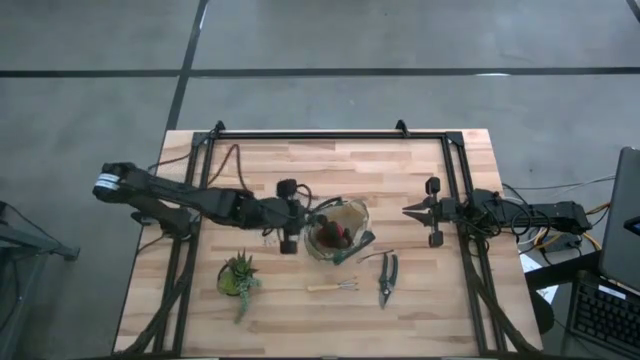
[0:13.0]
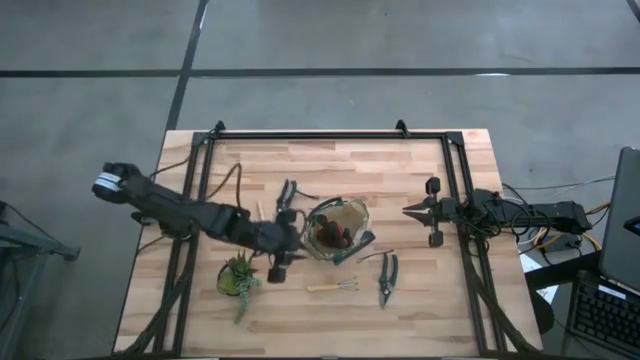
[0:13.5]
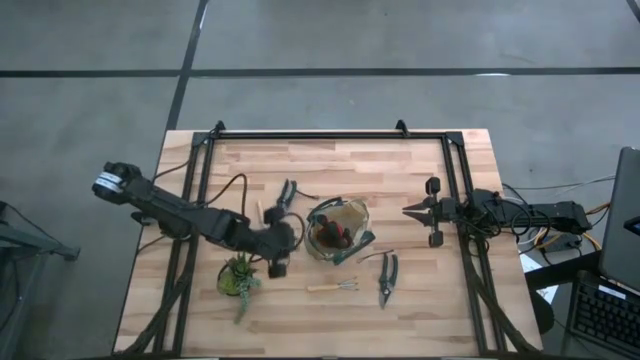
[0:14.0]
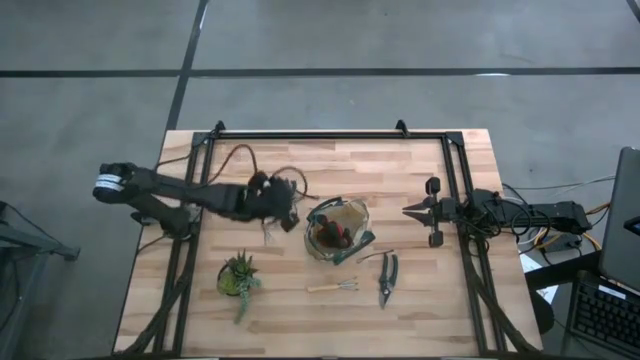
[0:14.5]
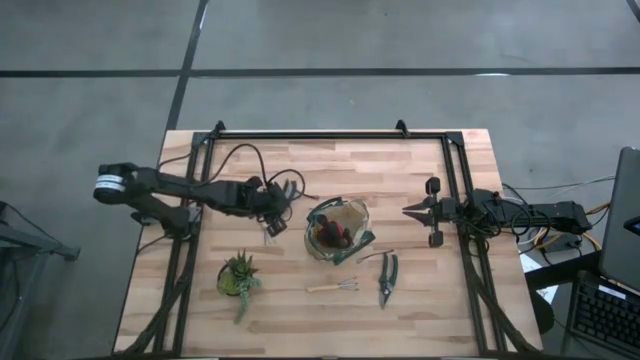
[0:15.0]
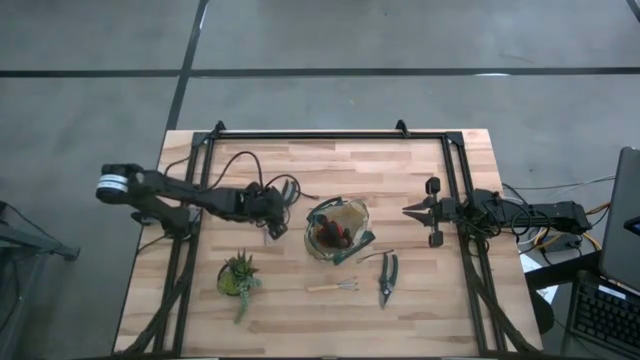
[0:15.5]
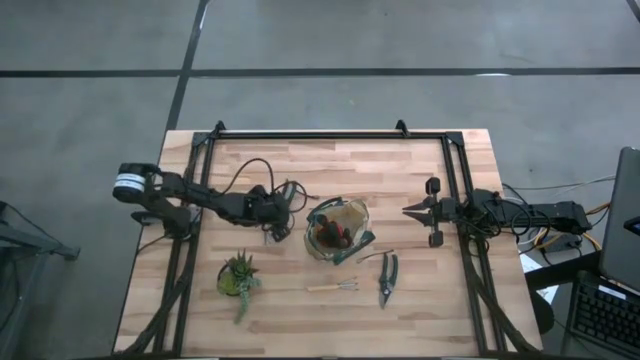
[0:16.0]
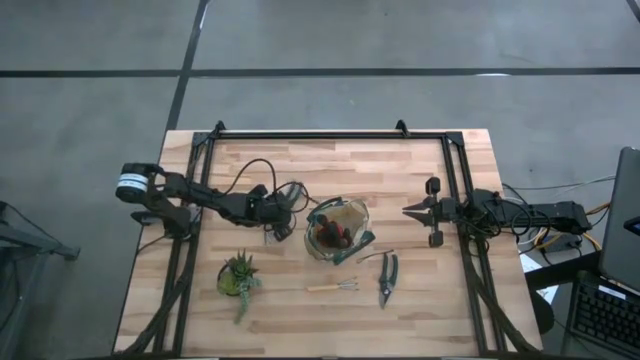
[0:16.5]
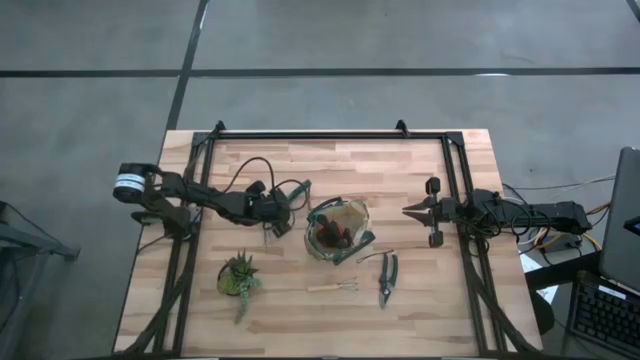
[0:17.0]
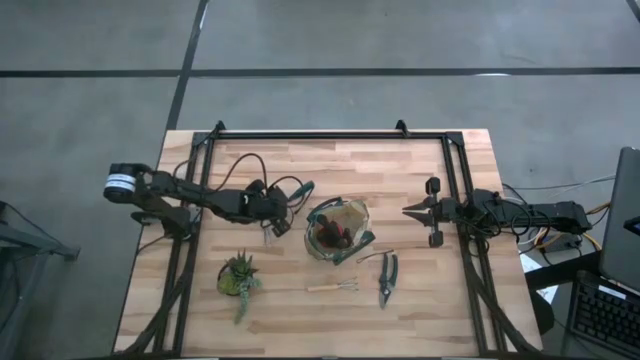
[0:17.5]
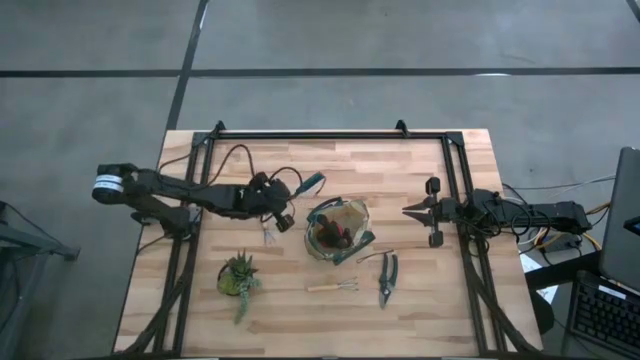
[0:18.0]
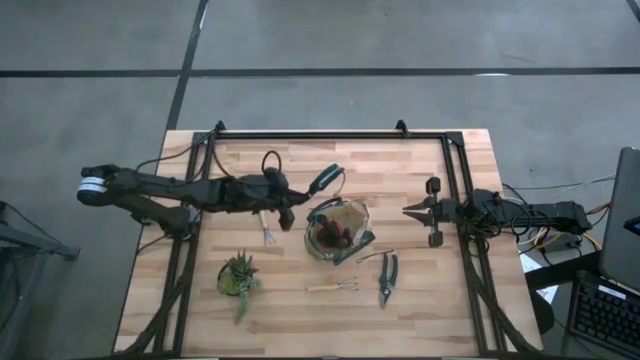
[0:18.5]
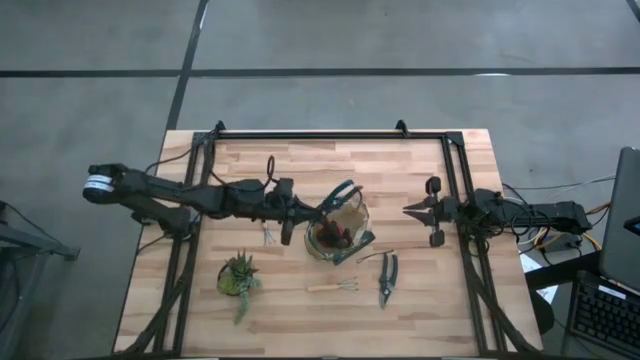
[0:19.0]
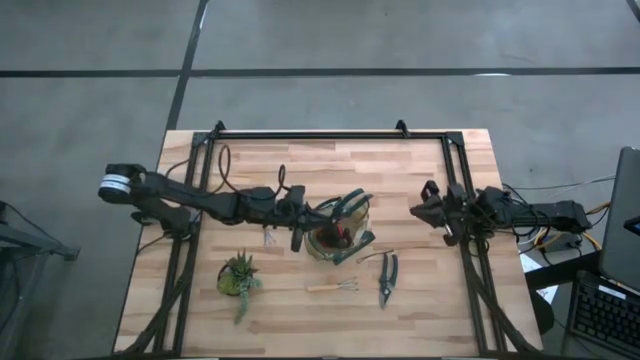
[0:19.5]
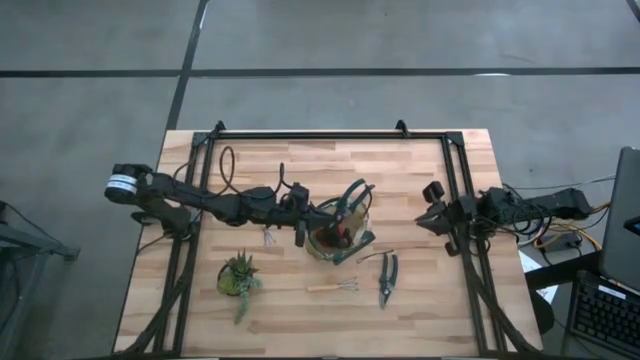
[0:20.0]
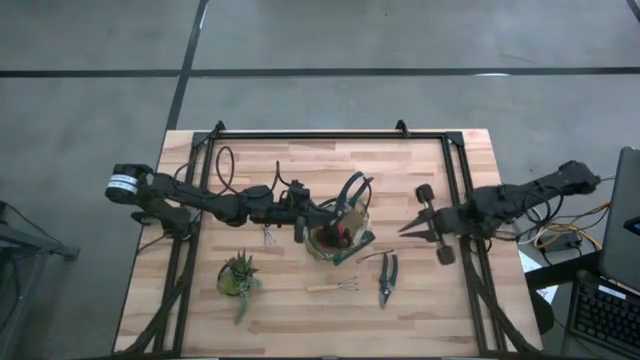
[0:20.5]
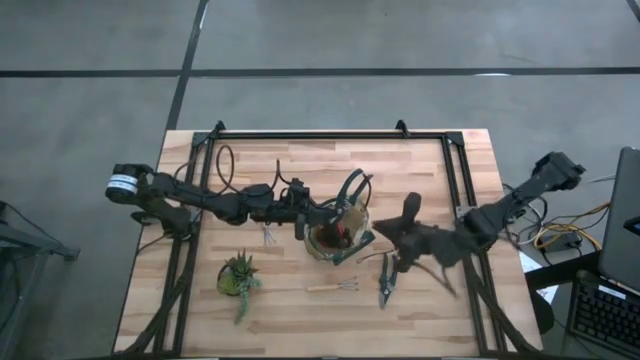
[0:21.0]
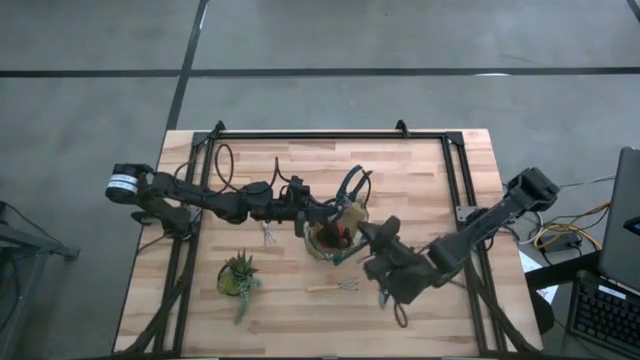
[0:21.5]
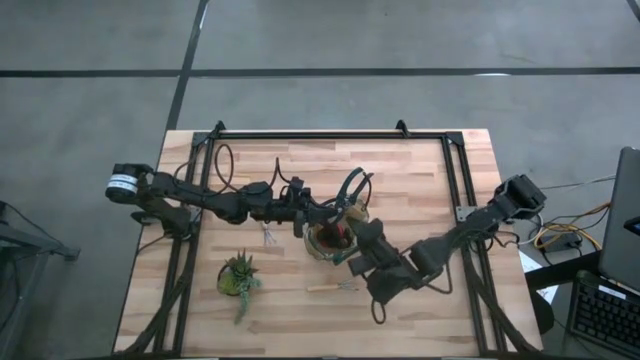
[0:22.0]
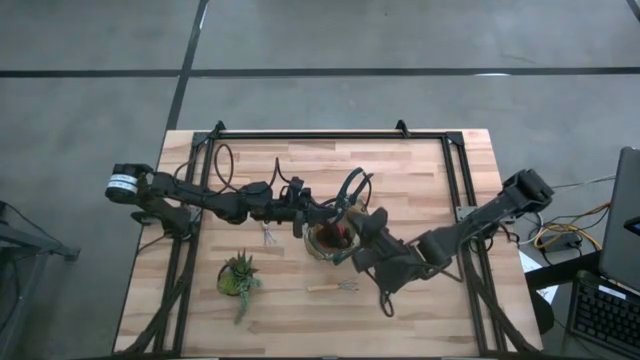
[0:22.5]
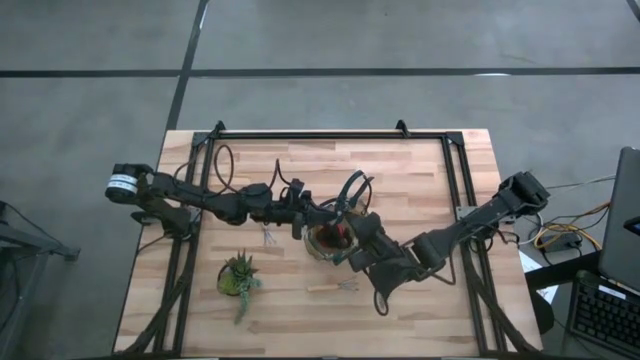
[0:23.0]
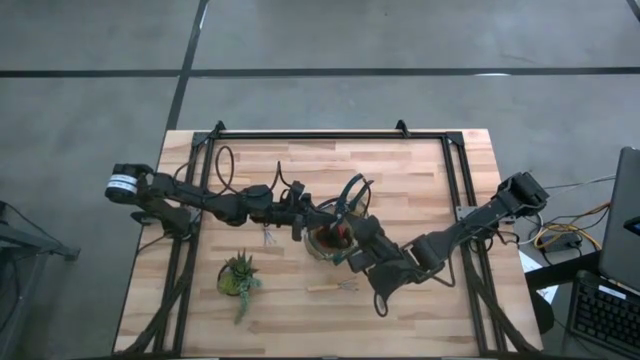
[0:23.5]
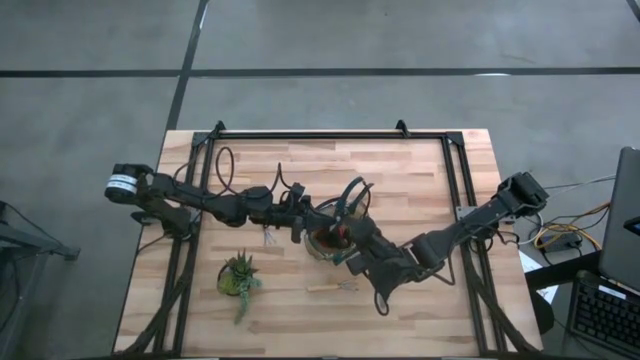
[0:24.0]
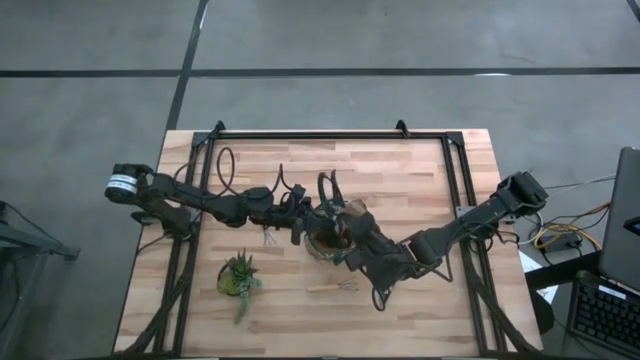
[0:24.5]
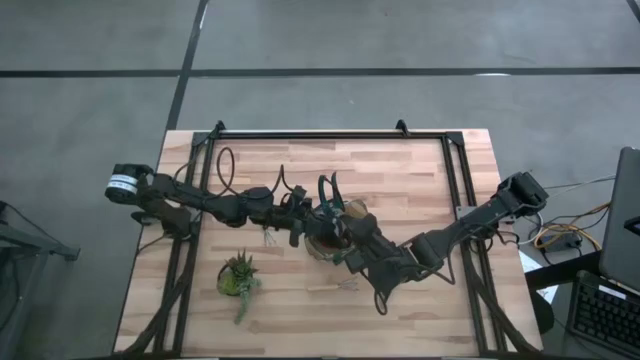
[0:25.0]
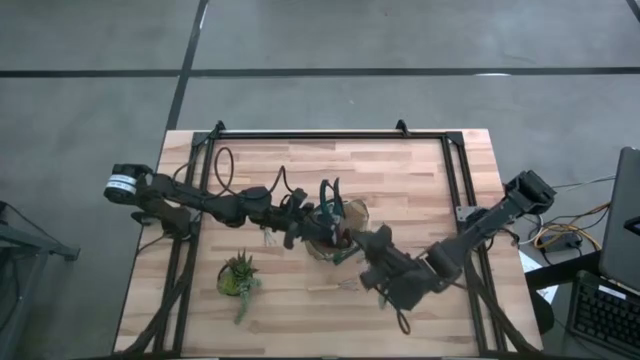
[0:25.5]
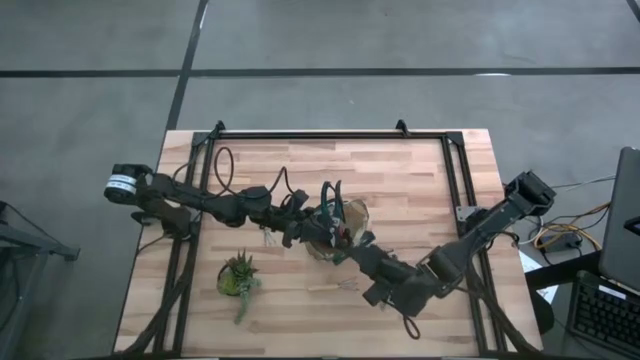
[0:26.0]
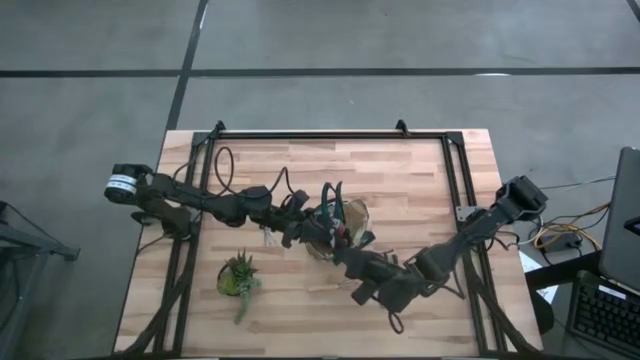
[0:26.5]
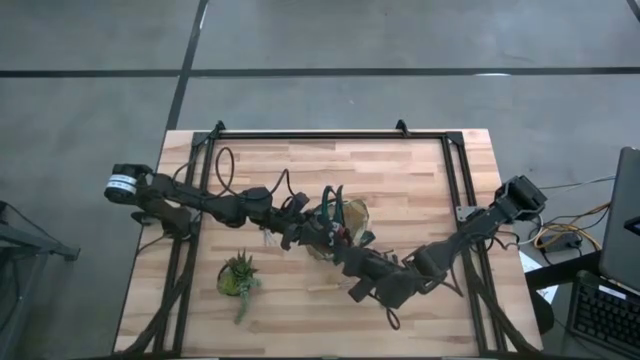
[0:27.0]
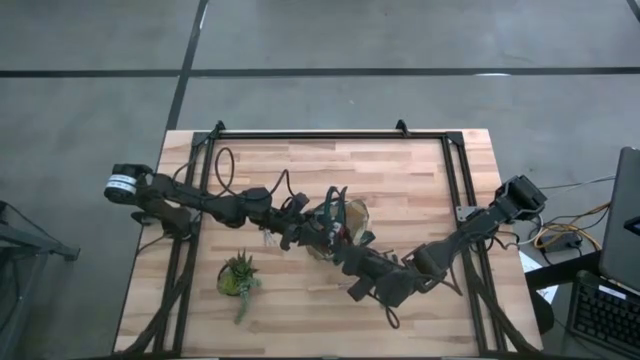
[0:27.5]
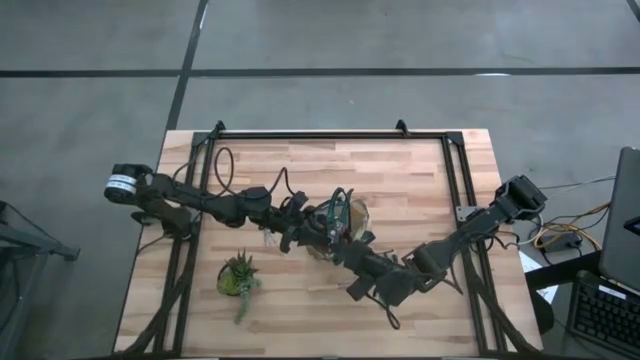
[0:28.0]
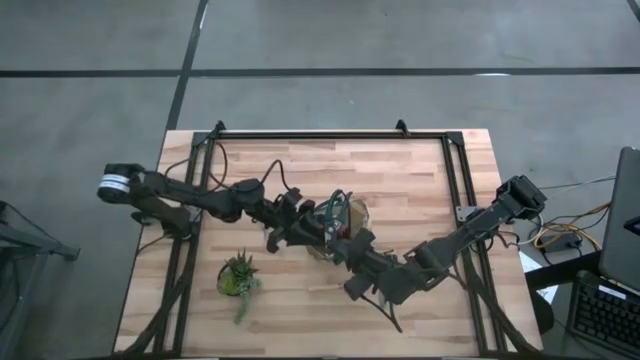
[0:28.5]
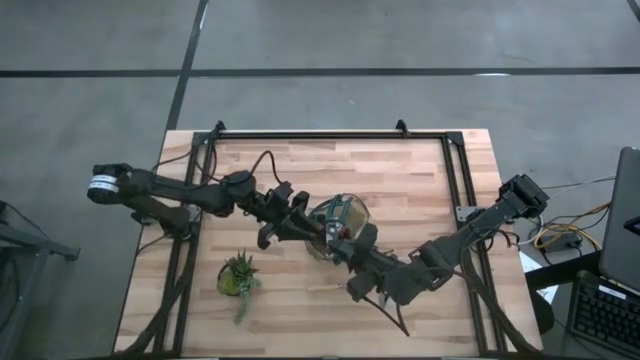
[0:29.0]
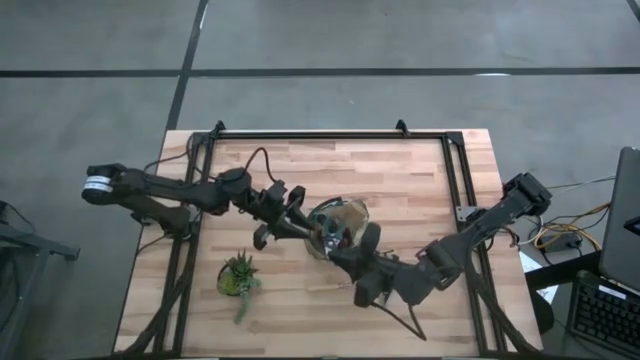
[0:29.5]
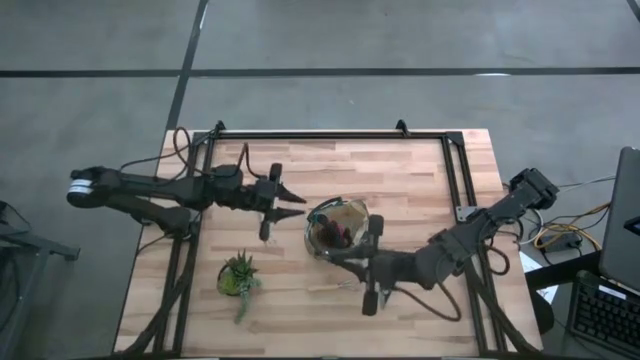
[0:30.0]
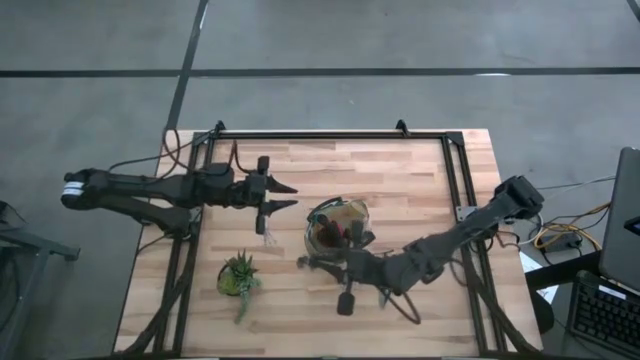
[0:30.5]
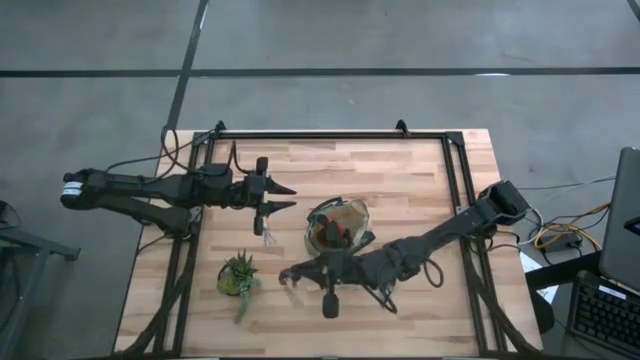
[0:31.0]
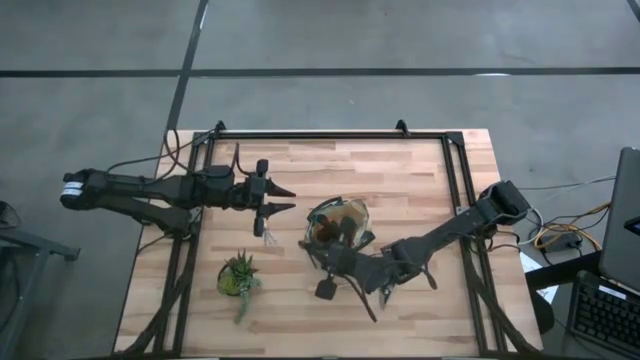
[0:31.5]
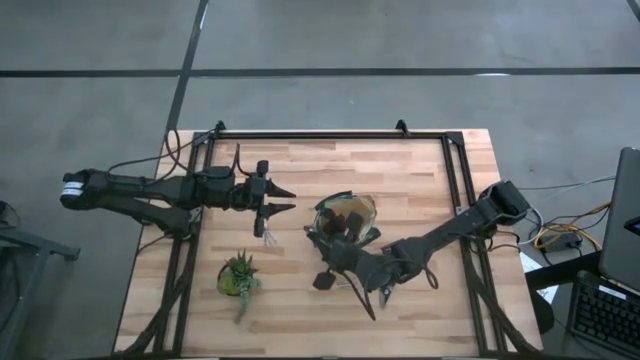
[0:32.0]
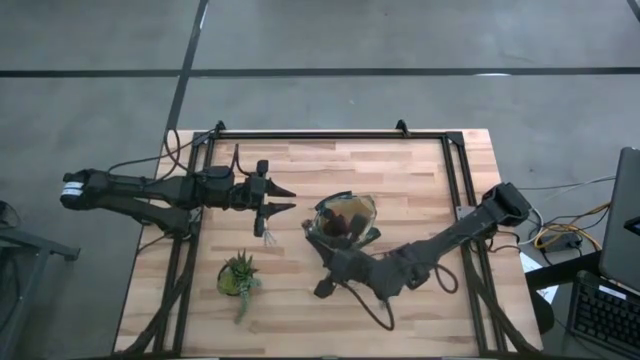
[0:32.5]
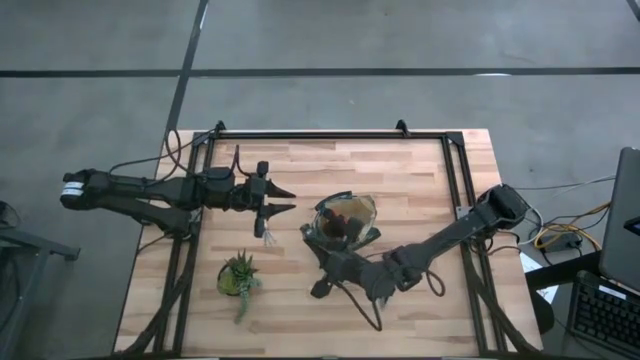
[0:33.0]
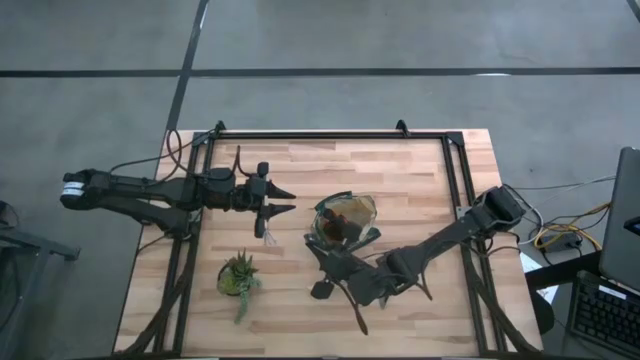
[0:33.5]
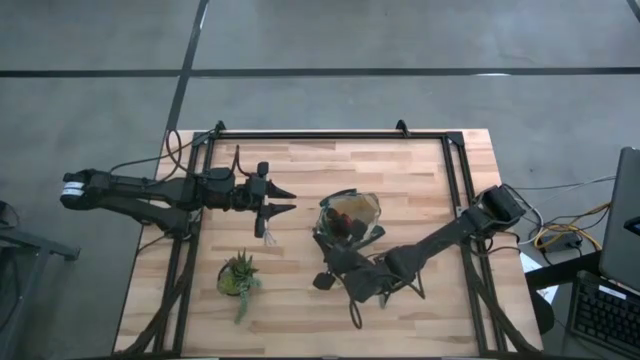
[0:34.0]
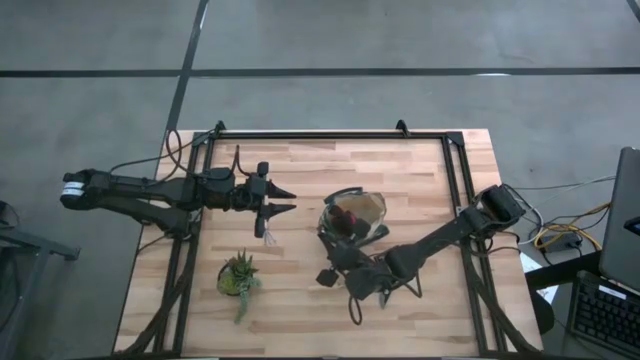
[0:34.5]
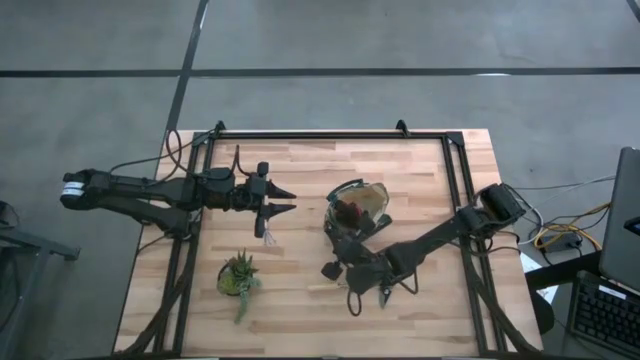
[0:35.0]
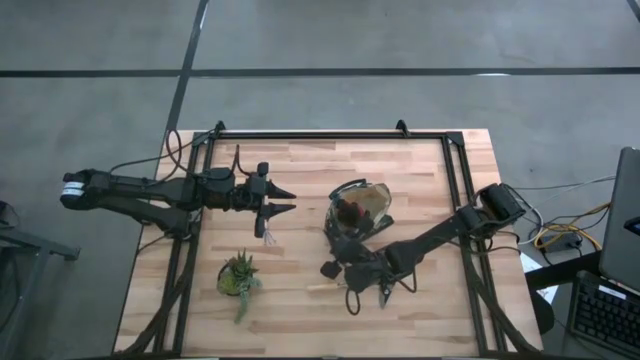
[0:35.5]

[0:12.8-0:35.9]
Task: Pick & Place Garden tools in Gardening bag
Put the top green shear scissors into the green gardening bag
